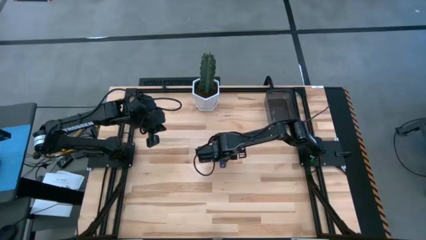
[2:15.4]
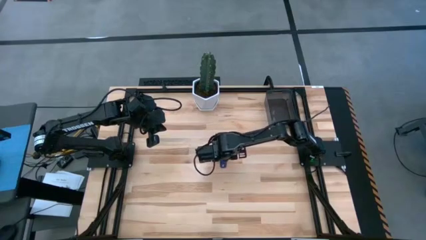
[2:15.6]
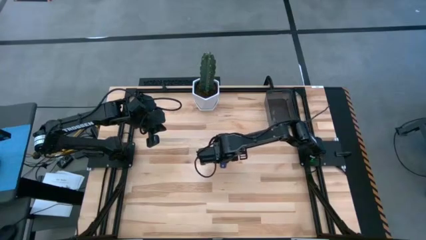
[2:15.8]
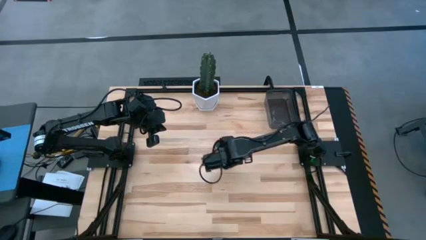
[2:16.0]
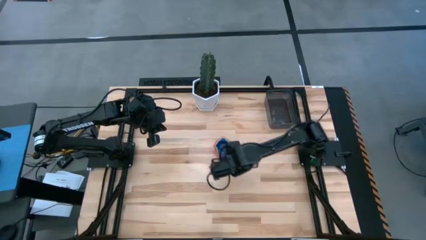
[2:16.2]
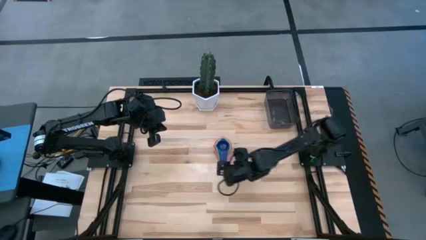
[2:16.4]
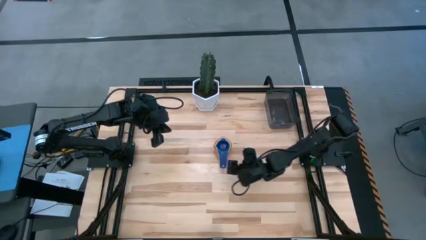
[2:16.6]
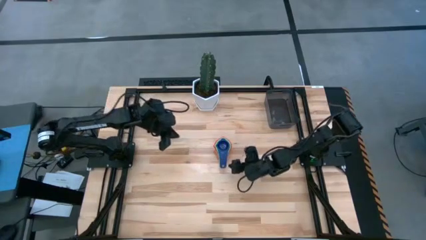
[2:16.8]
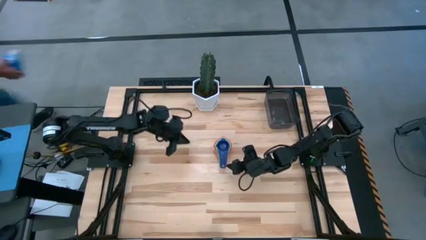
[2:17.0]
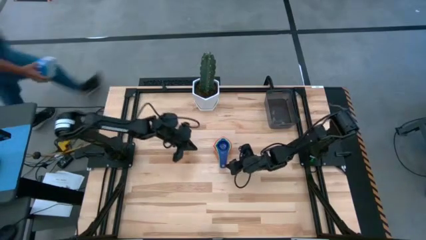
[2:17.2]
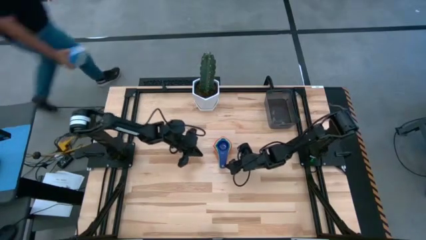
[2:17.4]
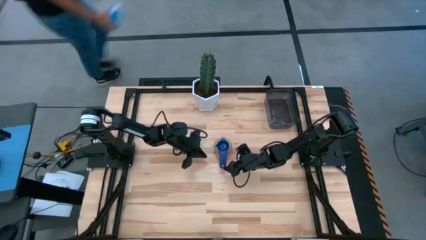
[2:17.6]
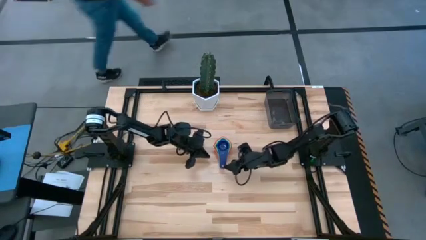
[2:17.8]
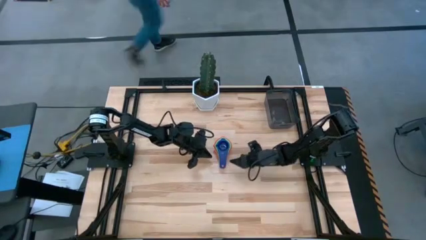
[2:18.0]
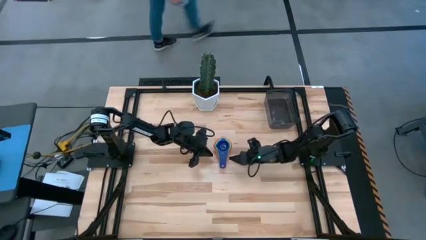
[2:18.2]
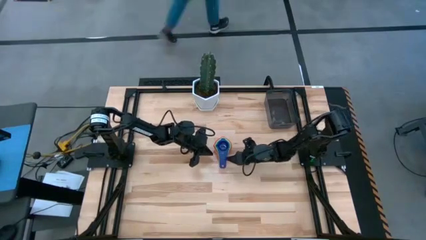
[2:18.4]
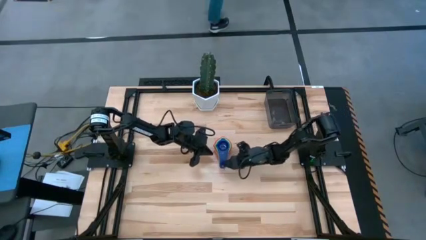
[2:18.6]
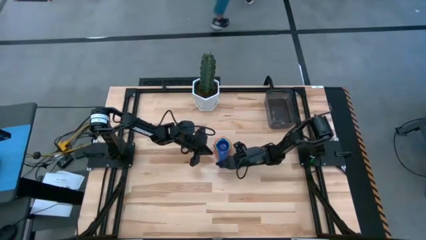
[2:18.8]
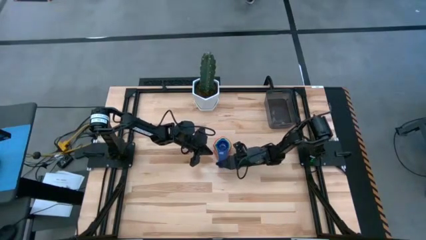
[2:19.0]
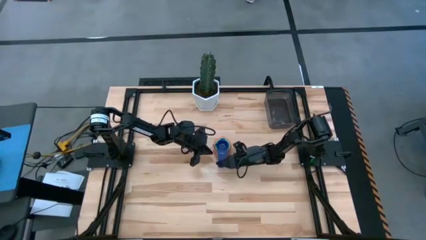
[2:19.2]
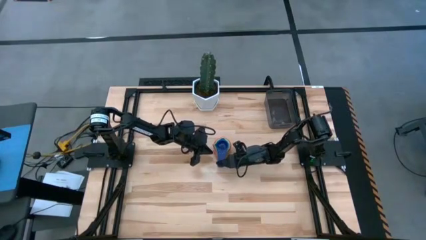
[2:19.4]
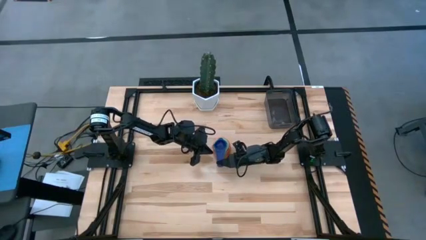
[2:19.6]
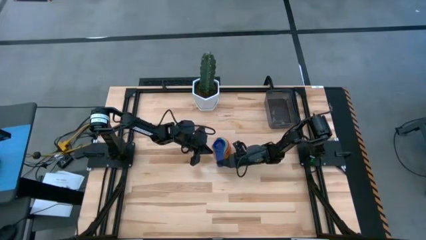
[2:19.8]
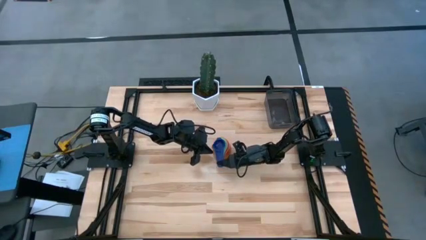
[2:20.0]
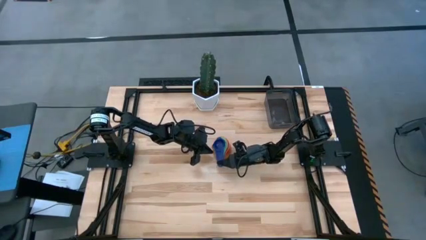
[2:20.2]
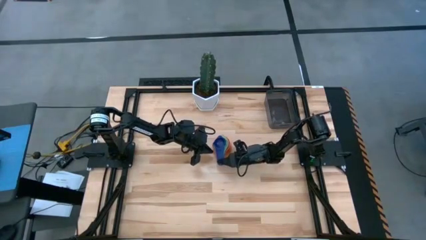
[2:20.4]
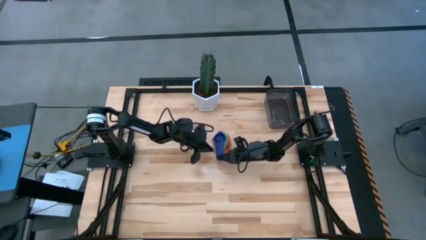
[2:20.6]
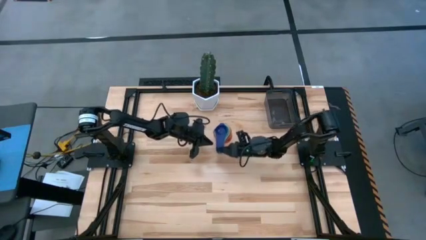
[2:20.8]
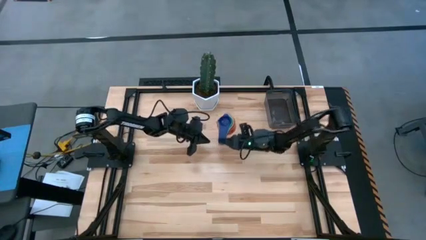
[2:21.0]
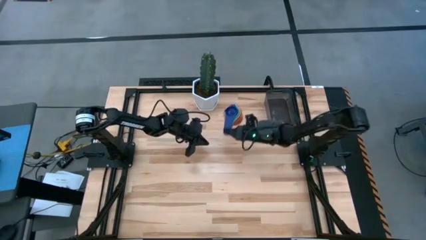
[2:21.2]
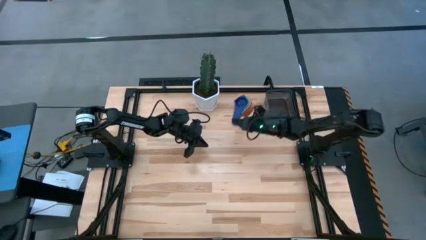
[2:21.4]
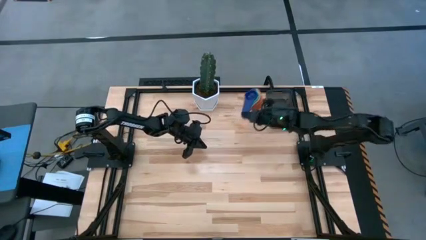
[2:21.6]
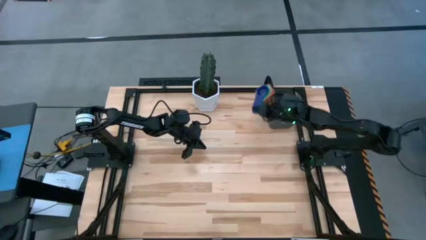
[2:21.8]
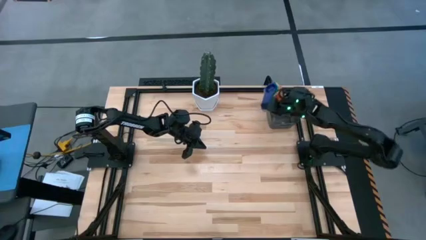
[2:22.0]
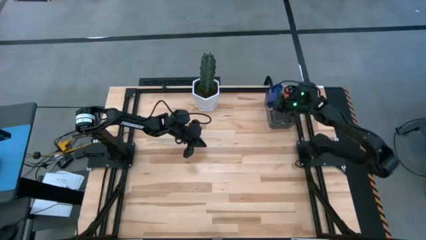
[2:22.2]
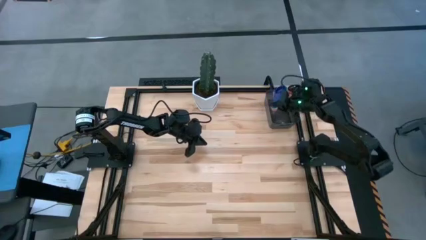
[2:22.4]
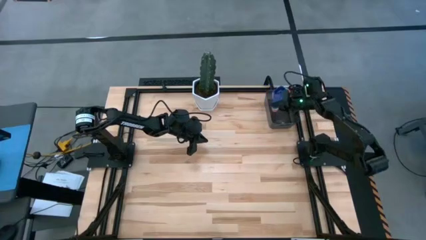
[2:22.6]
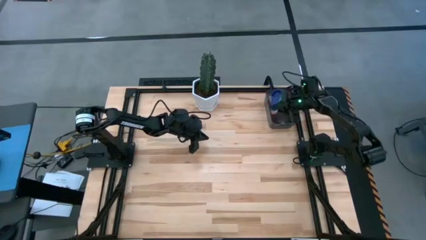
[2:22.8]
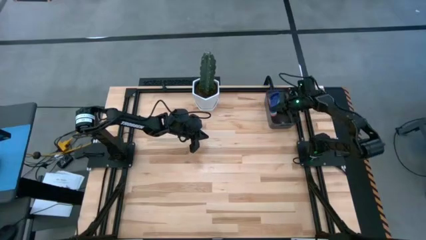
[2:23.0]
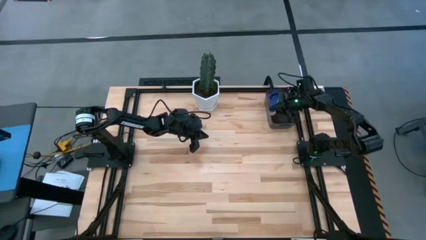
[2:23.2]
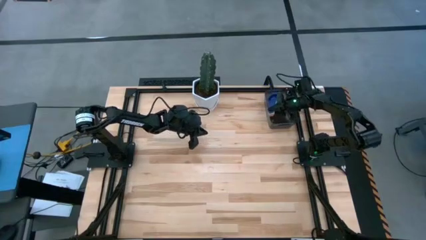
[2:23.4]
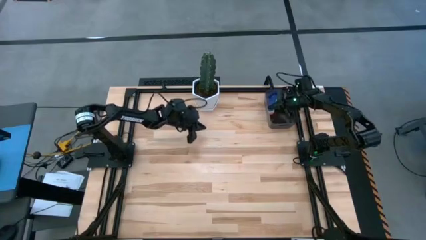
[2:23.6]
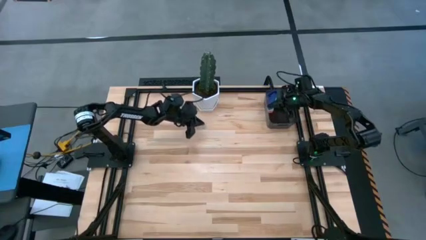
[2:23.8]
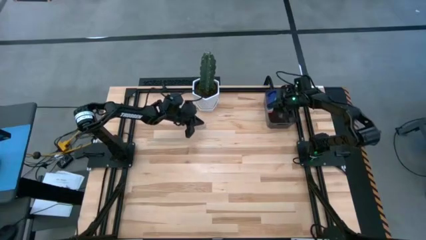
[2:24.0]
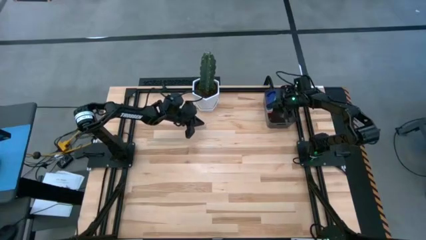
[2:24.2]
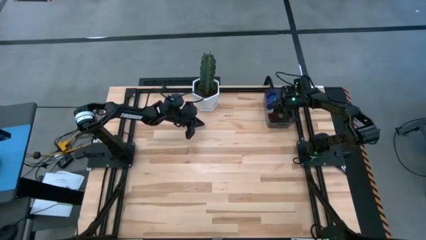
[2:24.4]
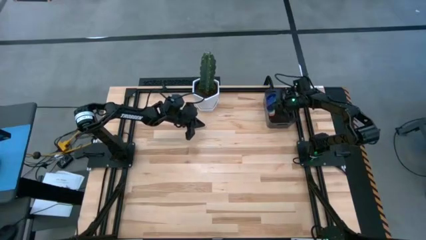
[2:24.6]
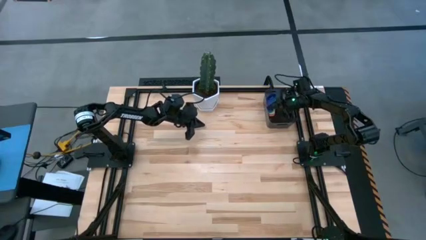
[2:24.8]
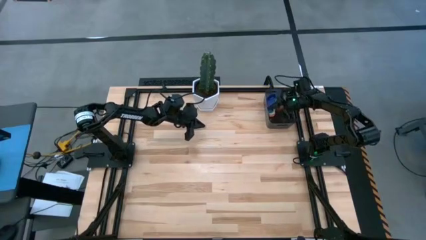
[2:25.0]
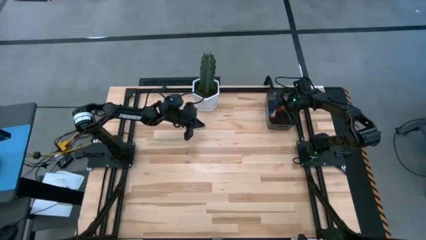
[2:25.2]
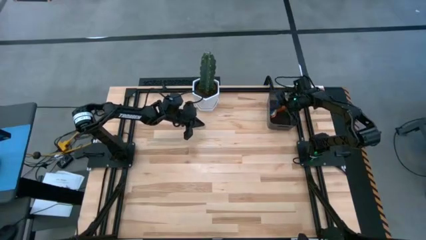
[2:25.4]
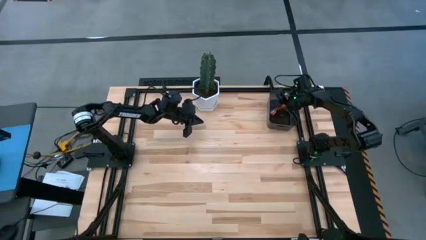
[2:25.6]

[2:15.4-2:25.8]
Task: Nest measuring cups in basket
Put the stacked measuring cups into the black bin

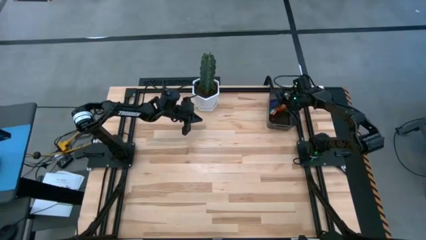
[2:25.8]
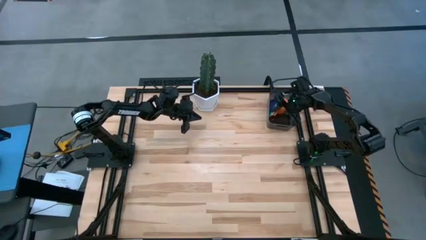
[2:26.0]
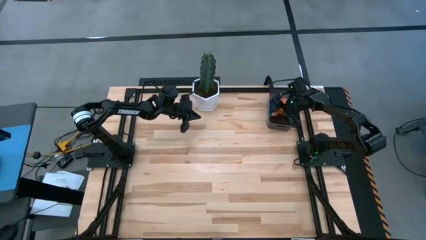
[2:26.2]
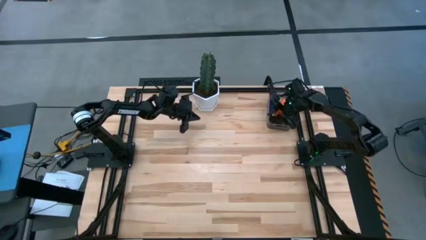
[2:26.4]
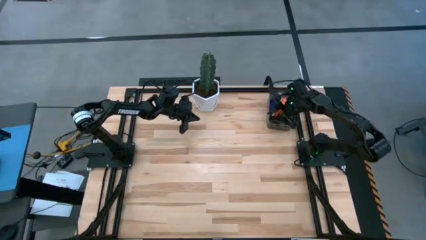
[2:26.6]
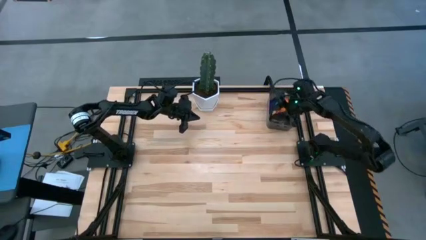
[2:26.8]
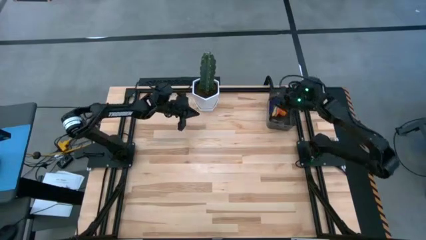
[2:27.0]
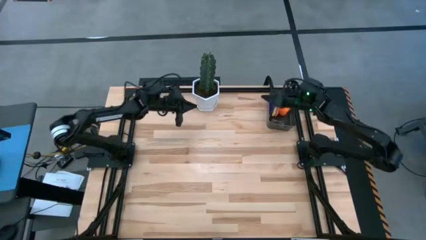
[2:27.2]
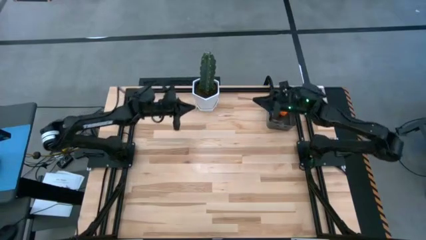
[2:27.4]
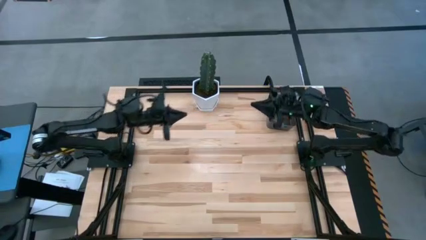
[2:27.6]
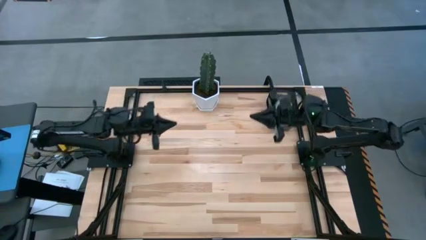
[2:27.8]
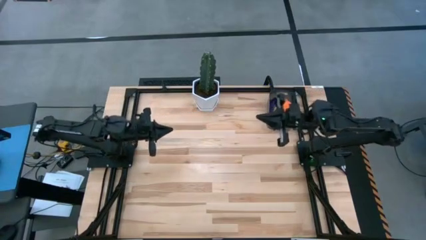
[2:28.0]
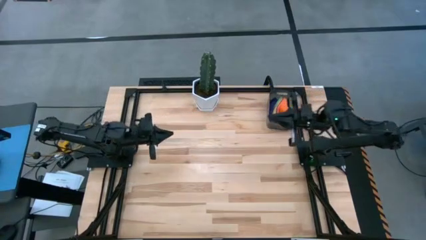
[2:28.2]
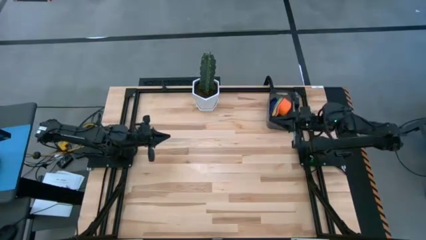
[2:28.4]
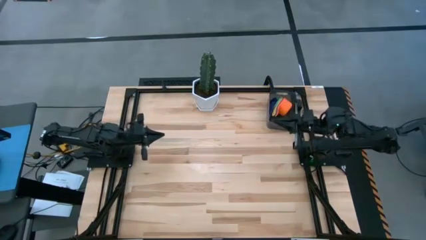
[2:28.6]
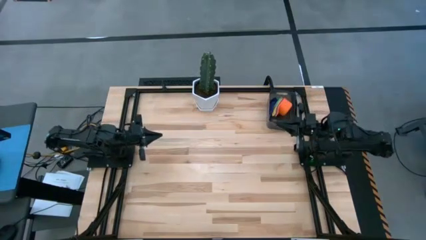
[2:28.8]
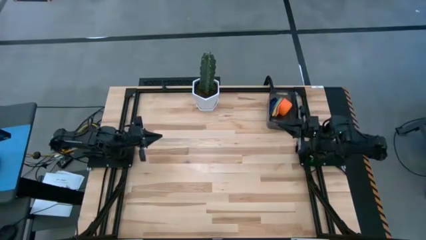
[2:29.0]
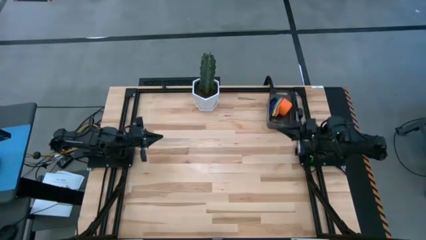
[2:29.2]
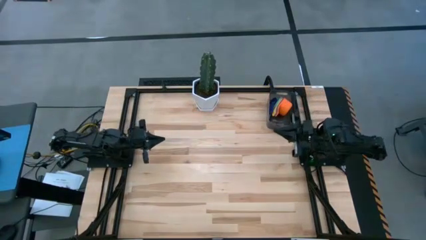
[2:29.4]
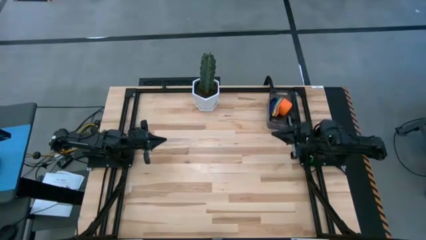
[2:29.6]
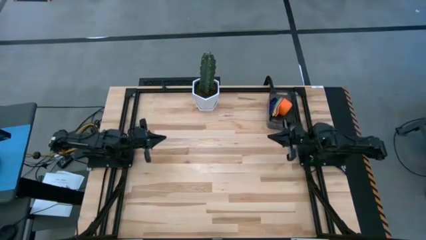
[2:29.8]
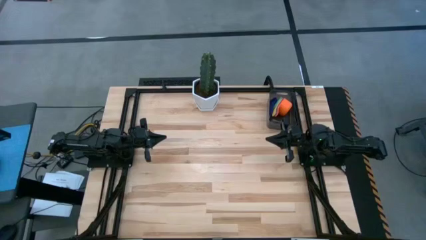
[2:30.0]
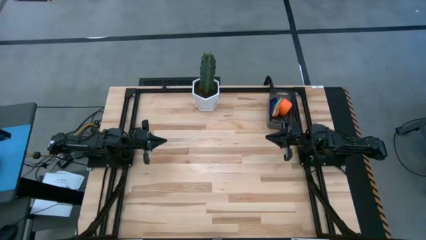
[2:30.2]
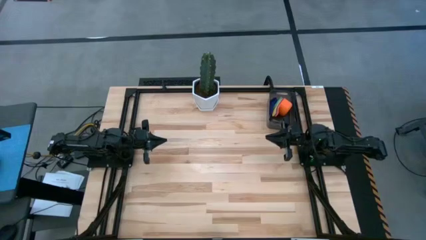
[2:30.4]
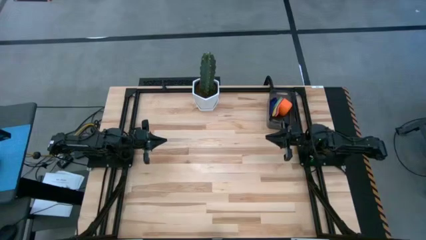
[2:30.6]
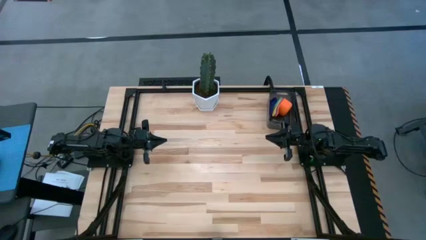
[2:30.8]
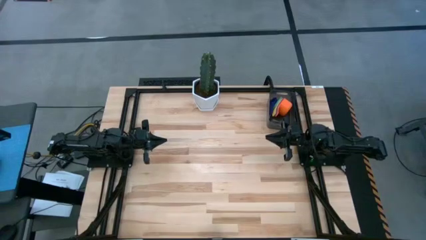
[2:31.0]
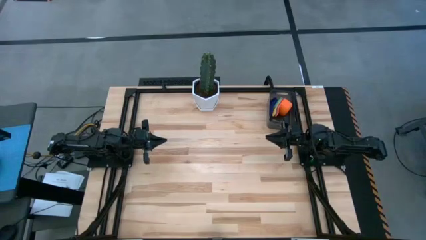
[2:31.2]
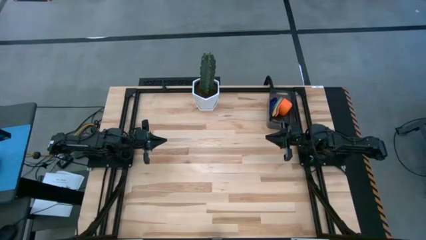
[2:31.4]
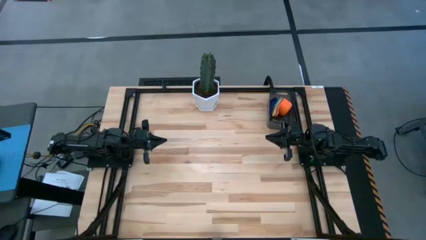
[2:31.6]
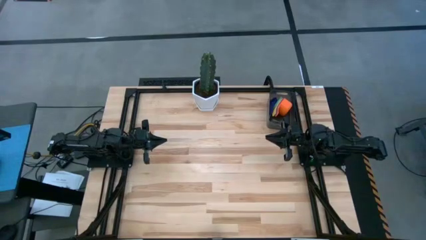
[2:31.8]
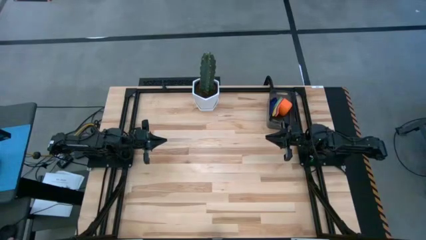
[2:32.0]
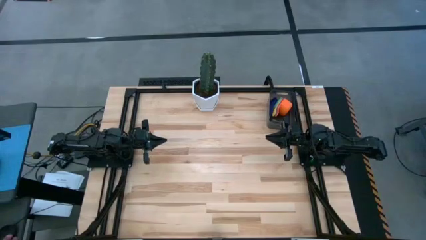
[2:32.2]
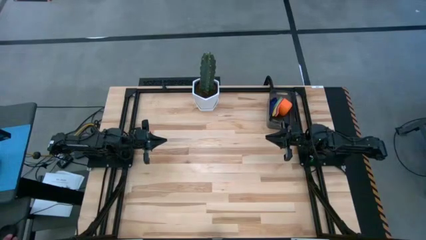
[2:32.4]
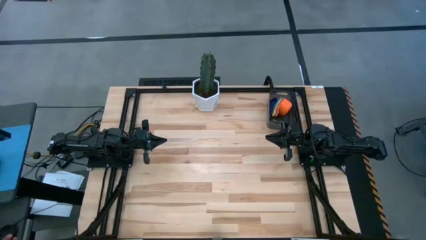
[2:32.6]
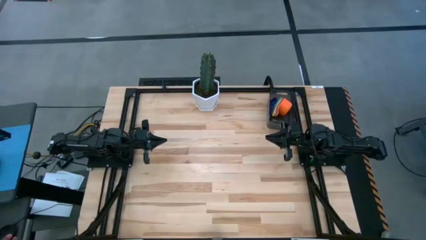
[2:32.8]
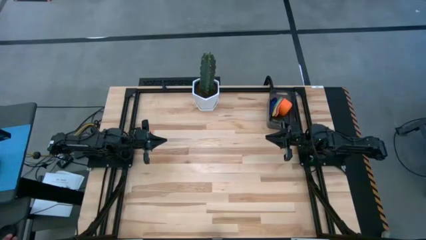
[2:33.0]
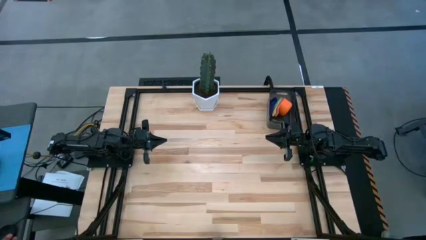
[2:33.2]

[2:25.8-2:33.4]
Return to Home Position
